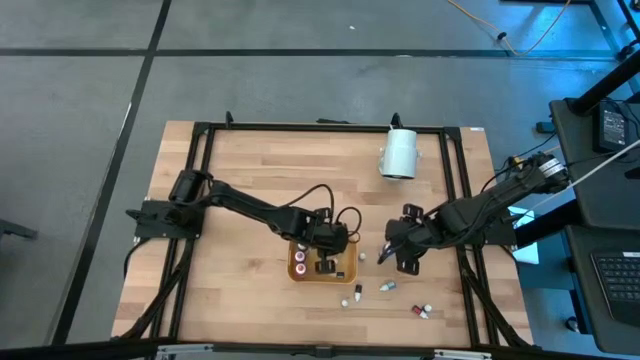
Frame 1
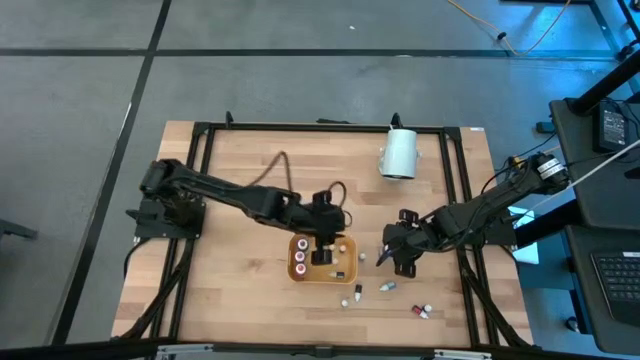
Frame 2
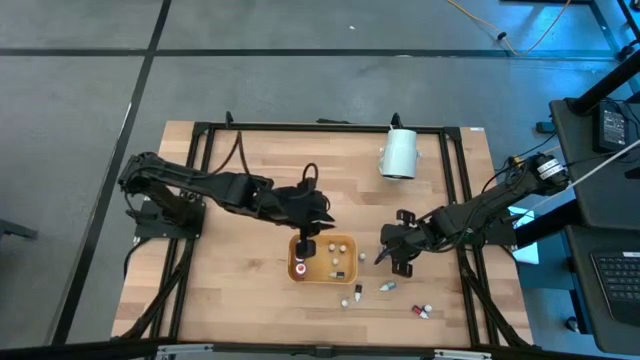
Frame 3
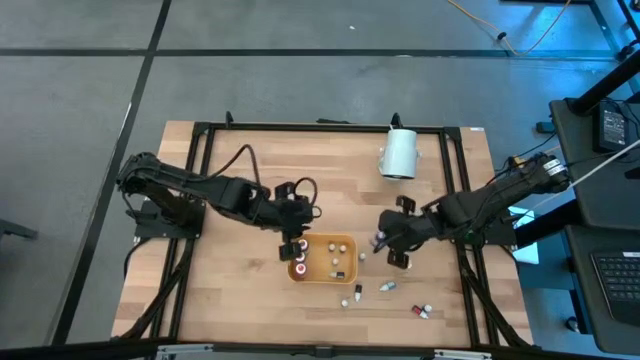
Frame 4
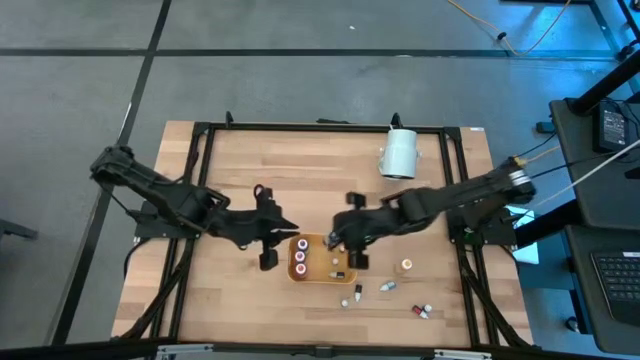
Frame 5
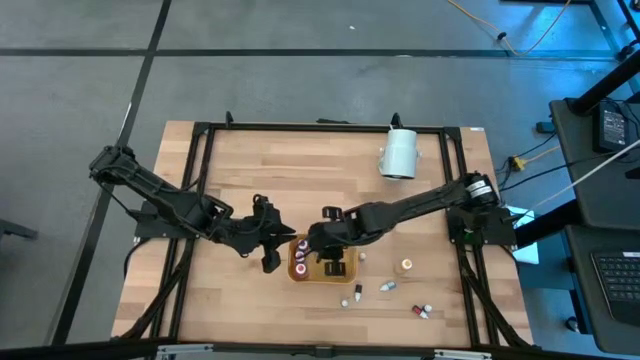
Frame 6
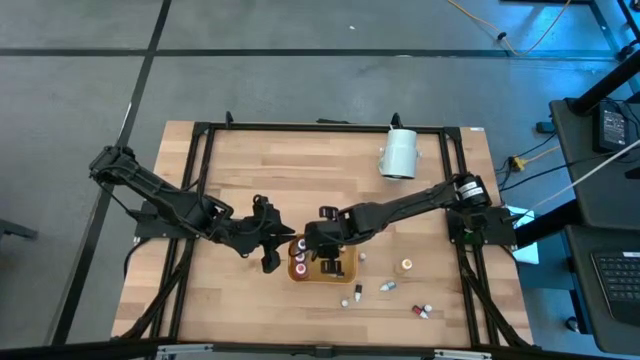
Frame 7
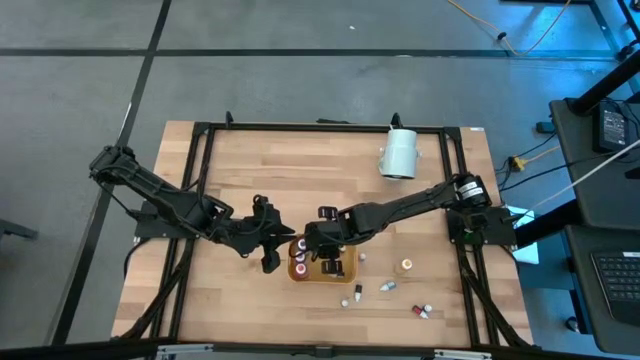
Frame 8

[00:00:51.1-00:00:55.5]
Task: Pick & Place food coloring
Put the large blue food coloring bottle in the yellow bin

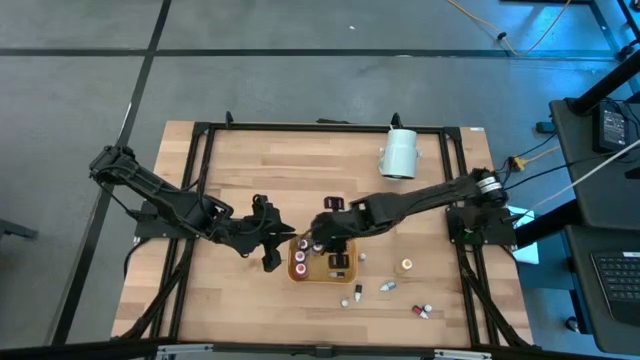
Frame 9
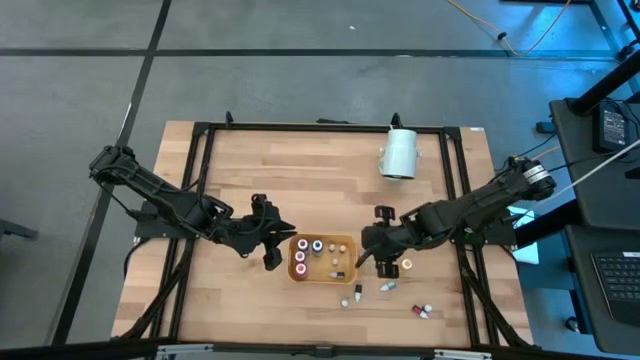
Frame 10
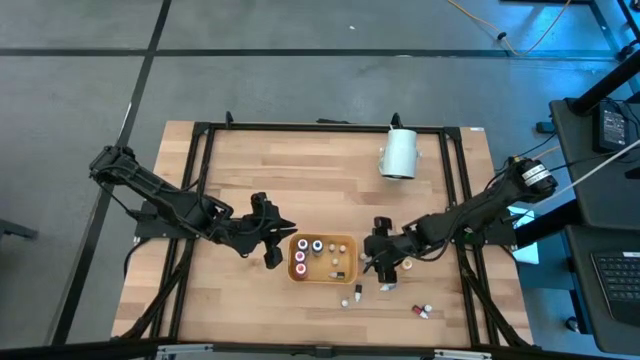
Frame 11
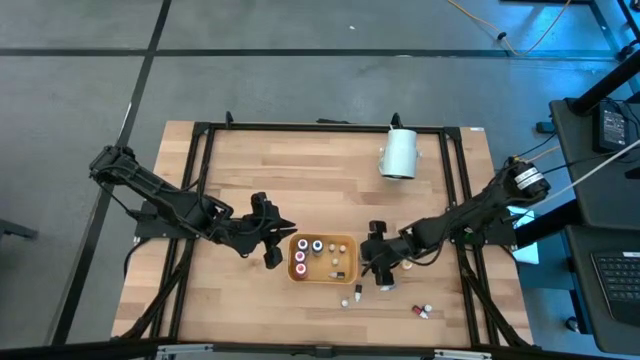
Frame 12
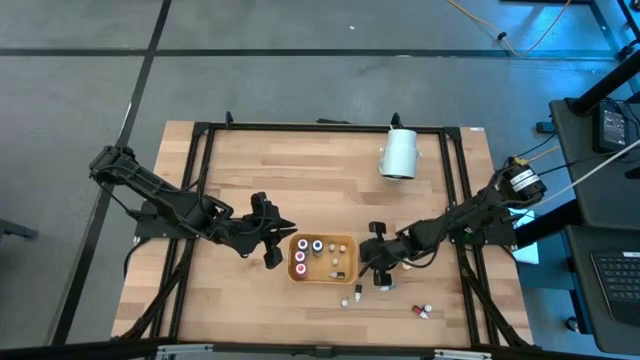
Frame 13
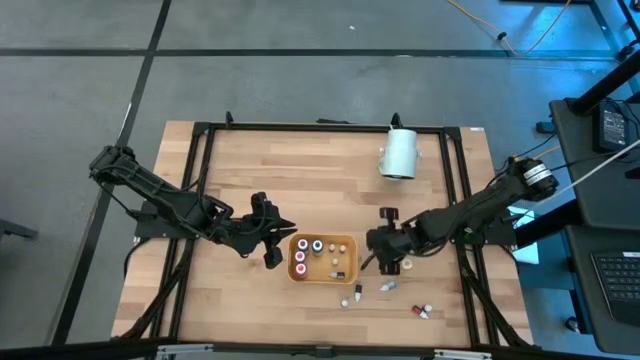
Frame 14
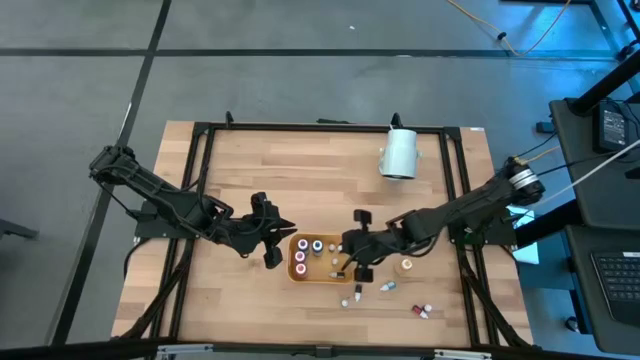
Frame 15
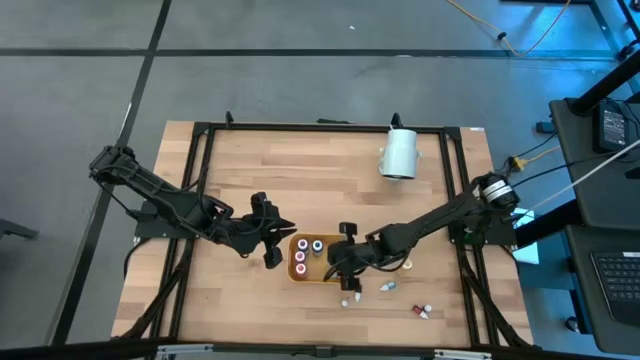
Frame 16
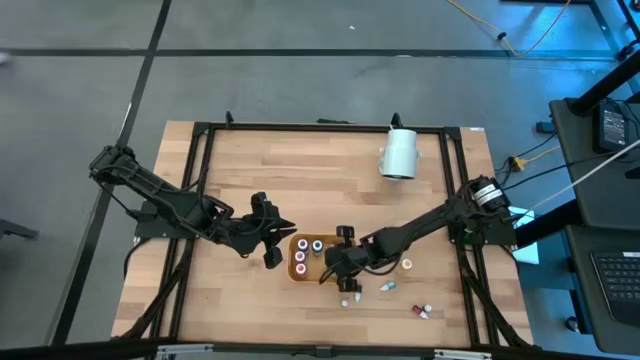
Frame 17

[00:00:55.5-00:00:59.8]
Put the small brown food coloring bottle in the yellow bin

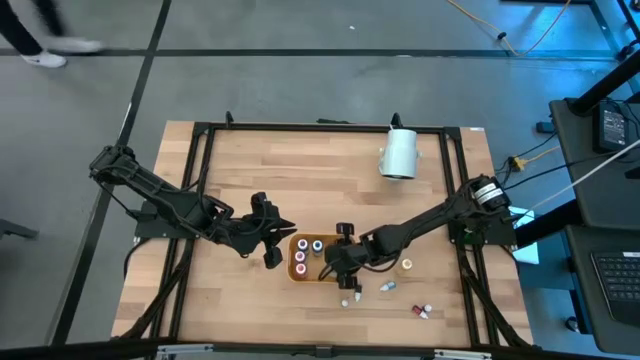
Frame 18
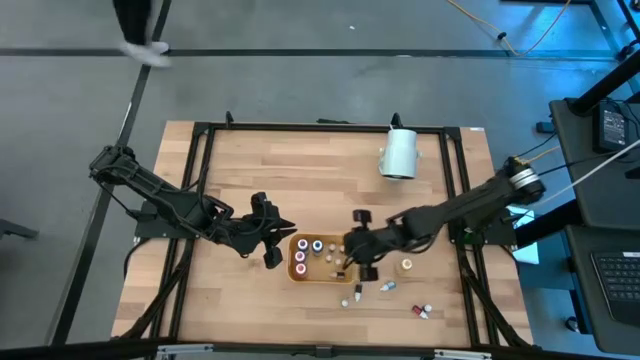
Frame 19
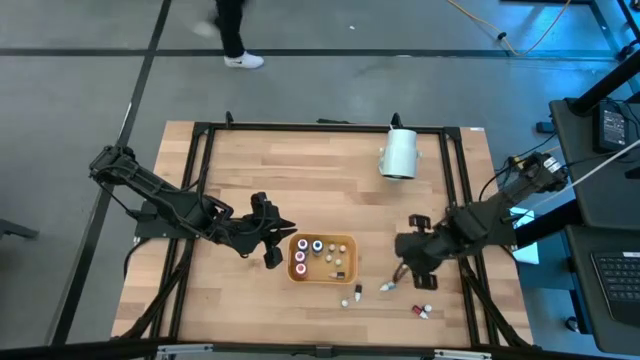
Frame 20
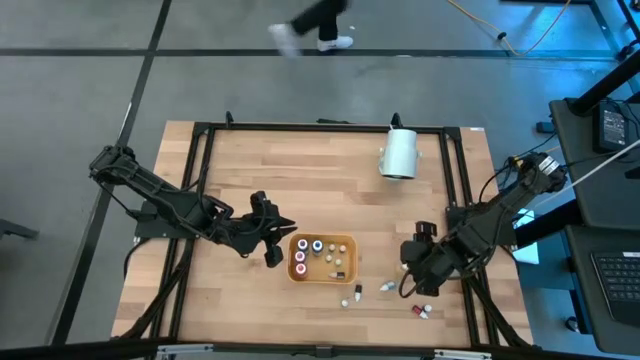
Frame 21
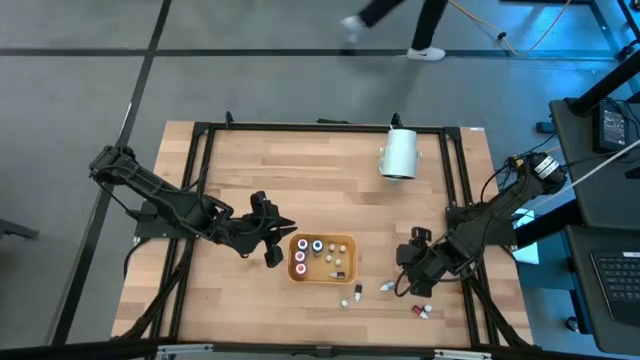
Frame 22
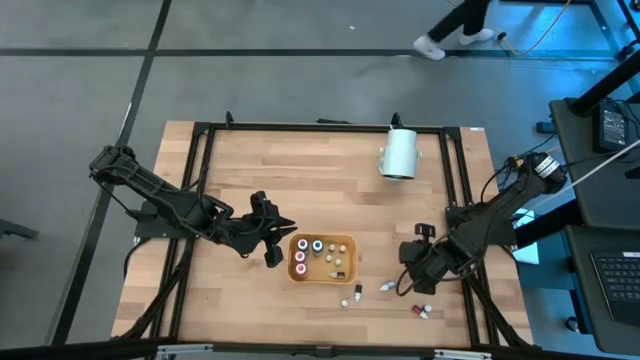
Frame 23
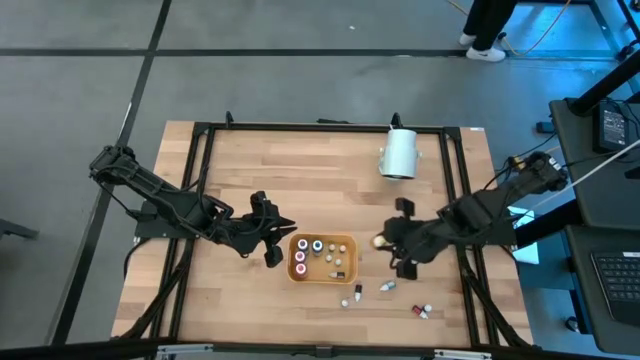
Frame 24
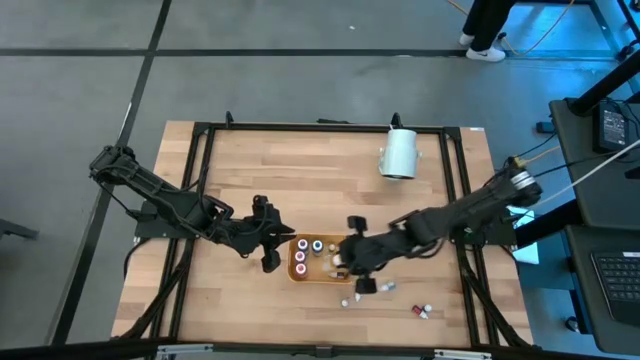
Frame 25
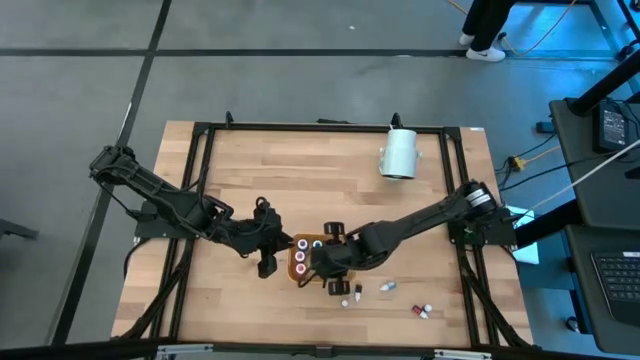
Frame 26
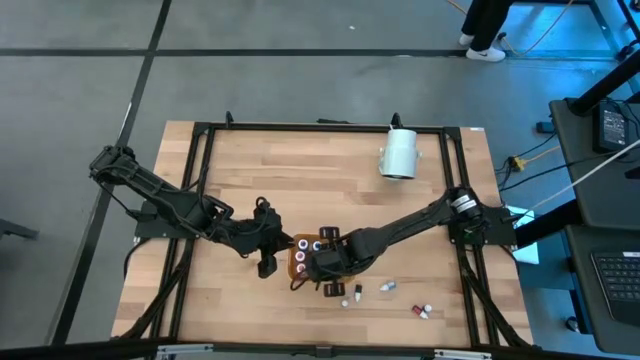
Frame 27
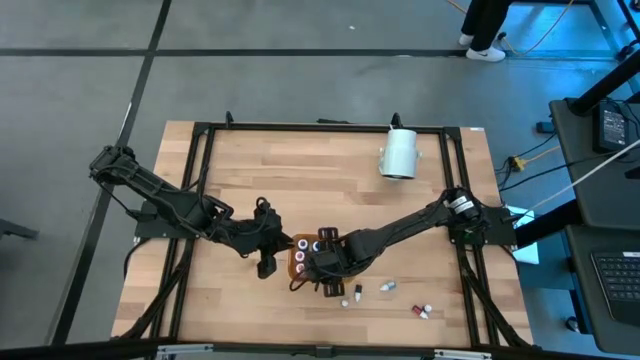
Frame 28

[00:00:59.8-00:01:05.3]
Put the large yellow food coloring bottle in the yellow bin

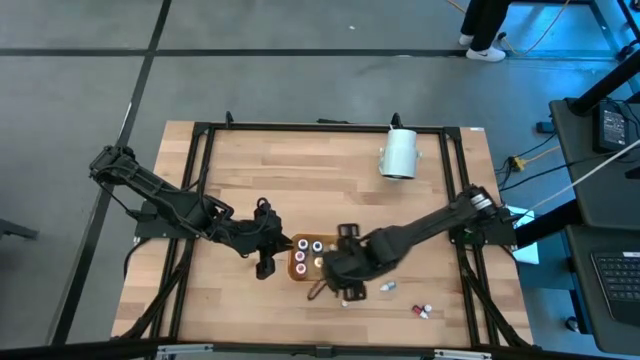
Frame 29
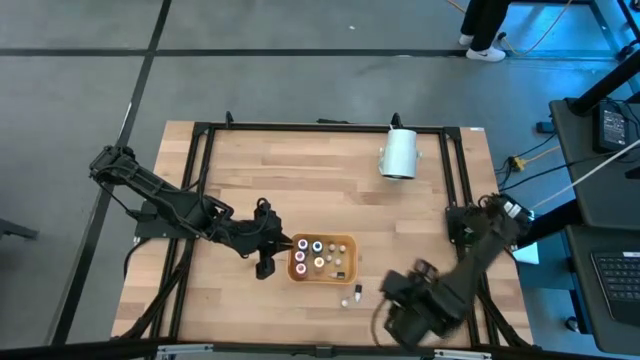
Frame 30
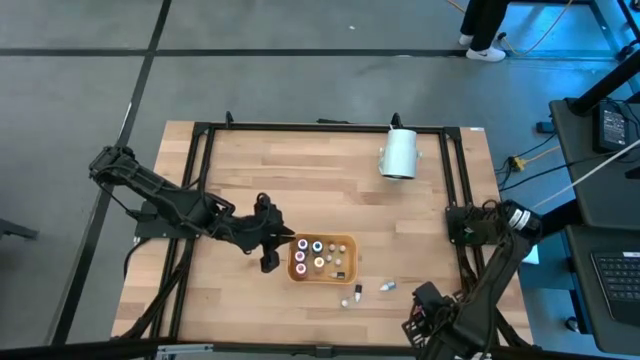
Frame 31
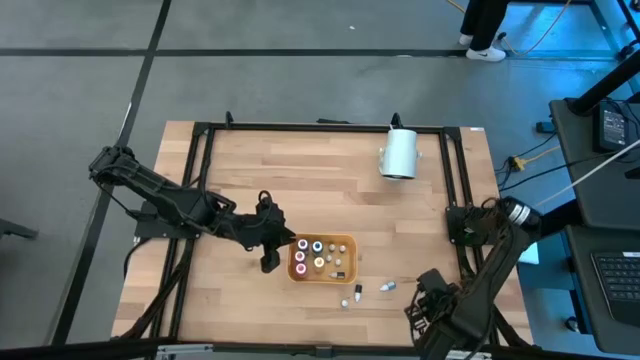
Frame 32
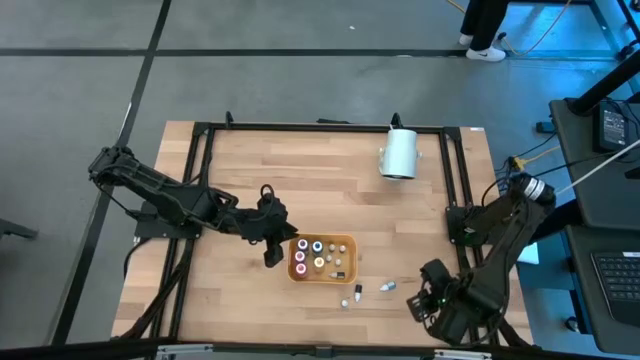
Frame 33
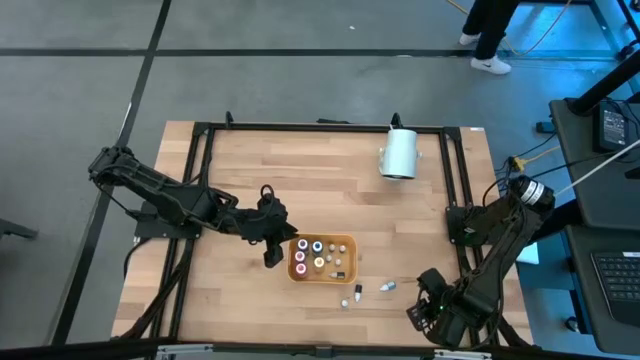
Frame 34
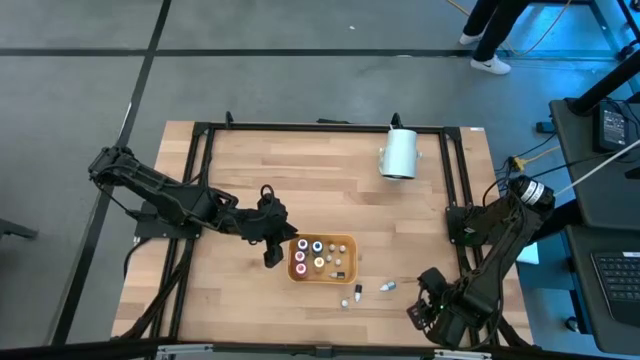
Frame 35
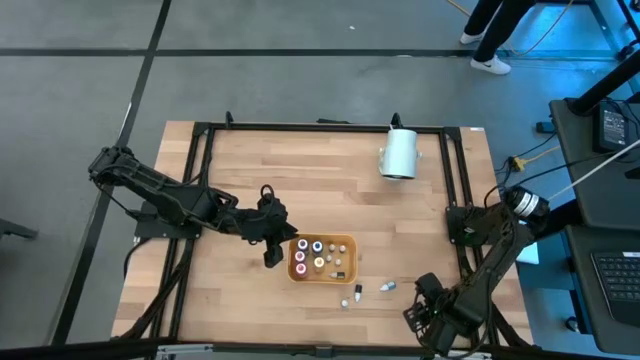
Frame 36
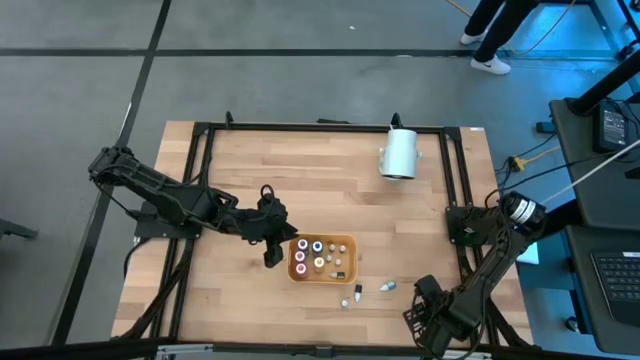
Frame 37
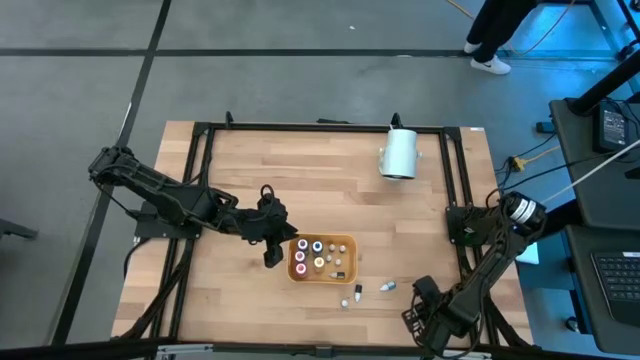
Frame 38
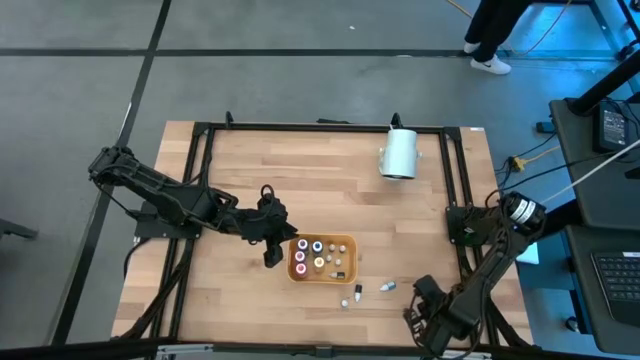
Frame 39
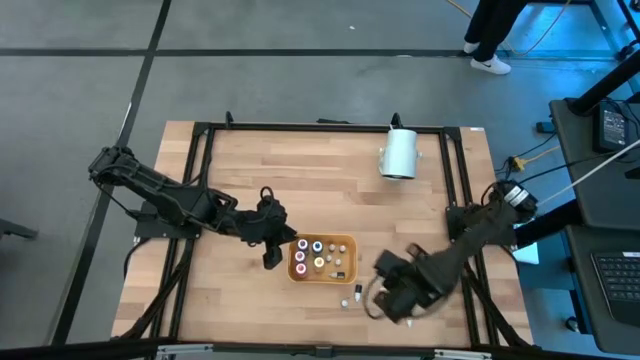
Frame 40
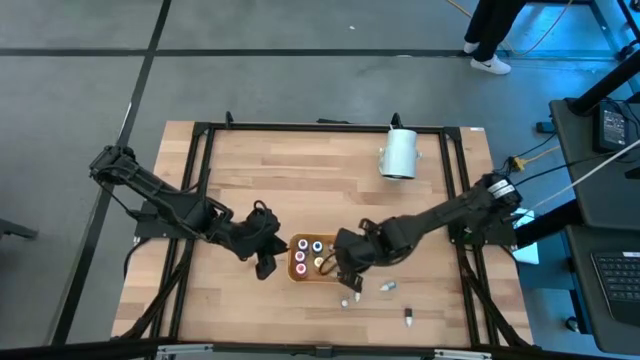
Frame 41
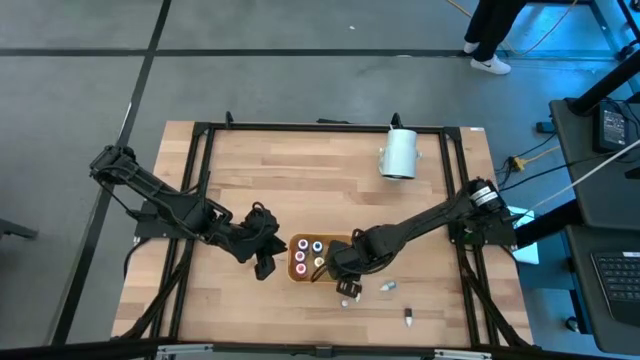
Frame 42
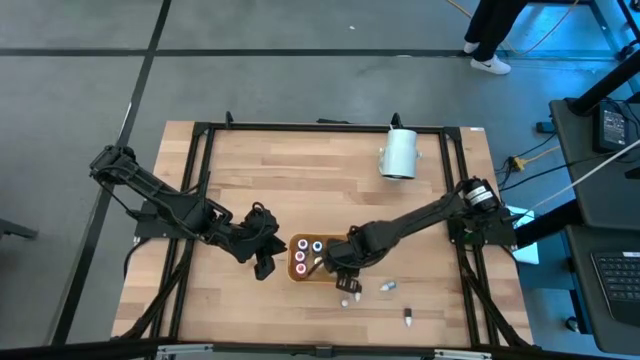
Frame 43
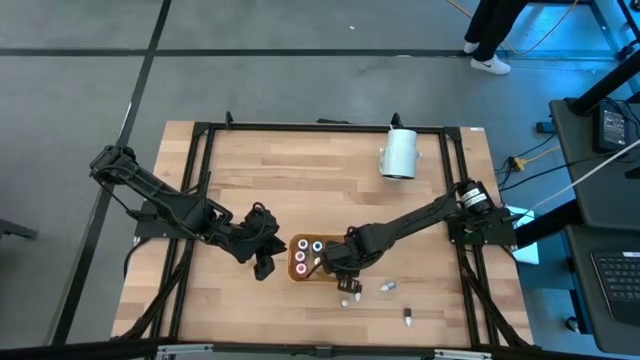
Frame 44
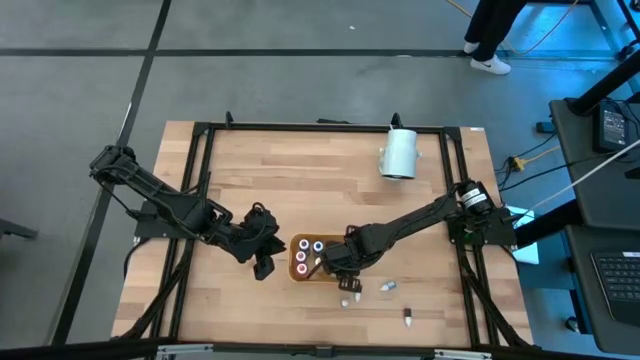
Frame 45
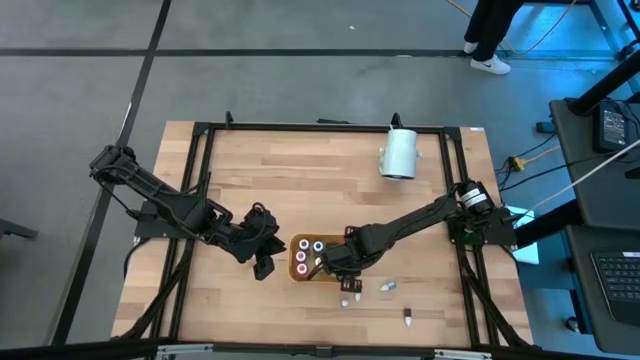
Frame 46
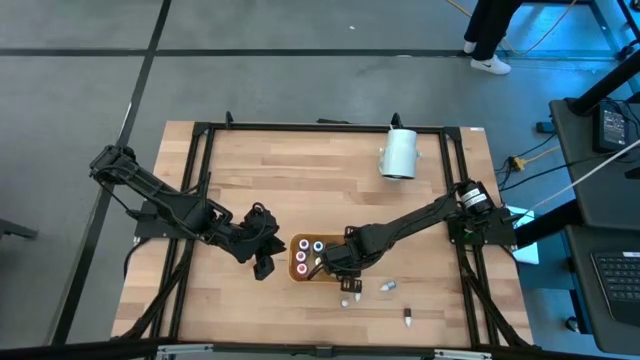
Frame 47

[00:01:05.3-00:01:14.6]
Put the small orange food coloring bottle in the yellow bin
